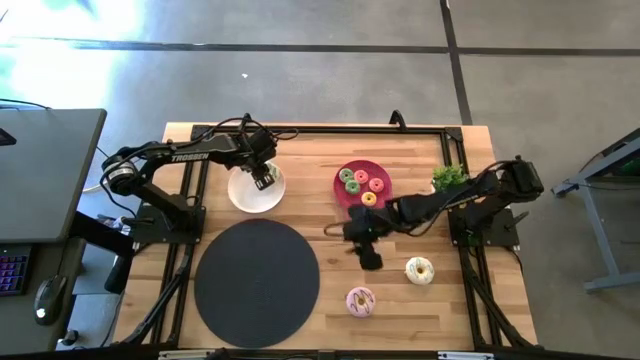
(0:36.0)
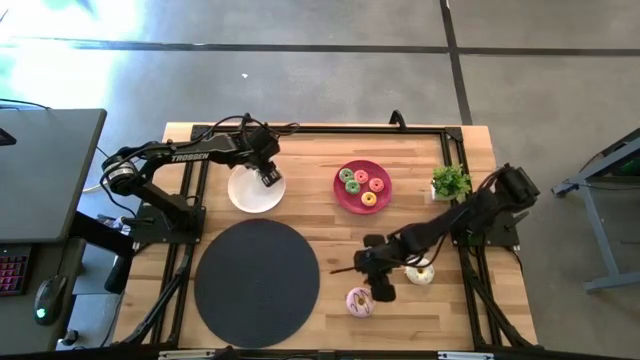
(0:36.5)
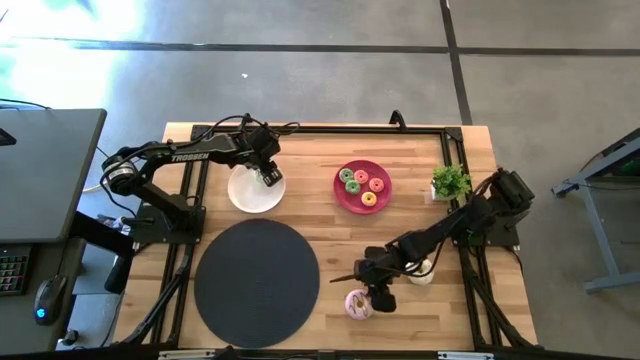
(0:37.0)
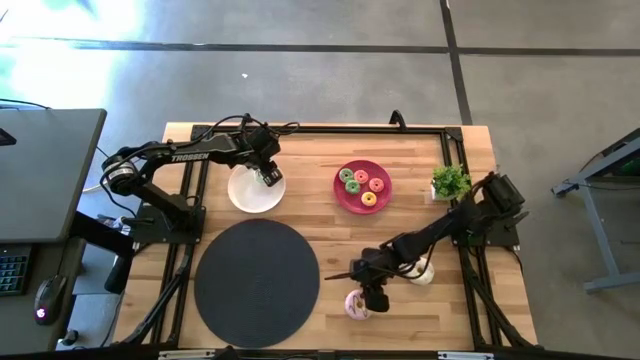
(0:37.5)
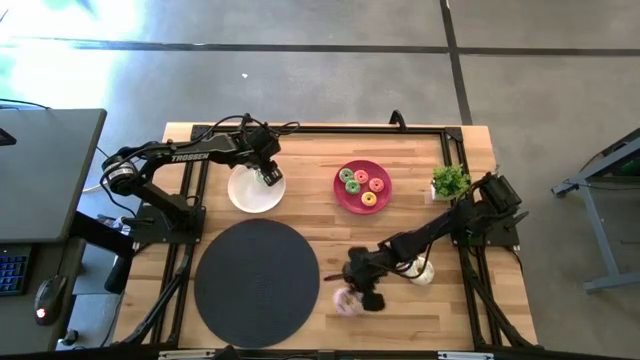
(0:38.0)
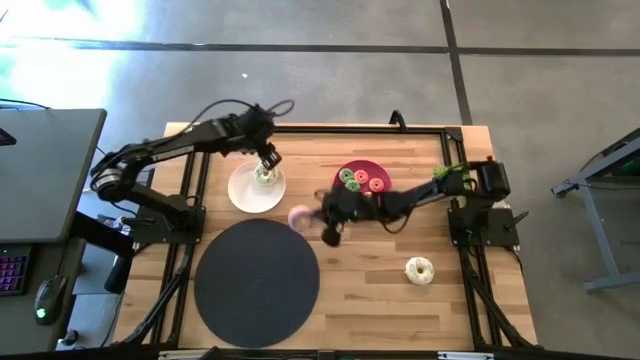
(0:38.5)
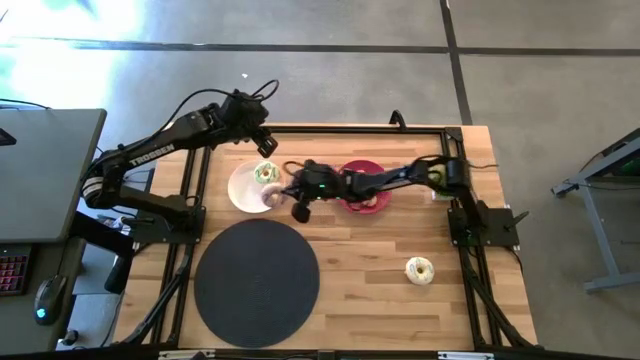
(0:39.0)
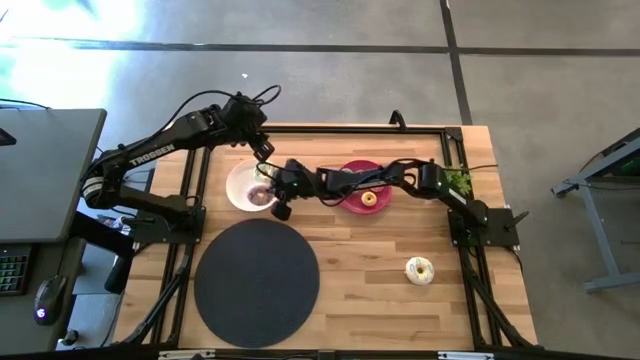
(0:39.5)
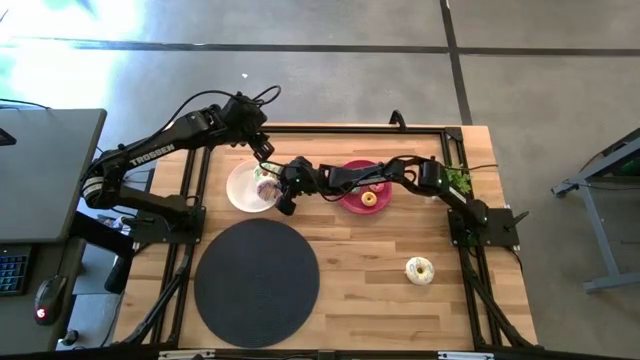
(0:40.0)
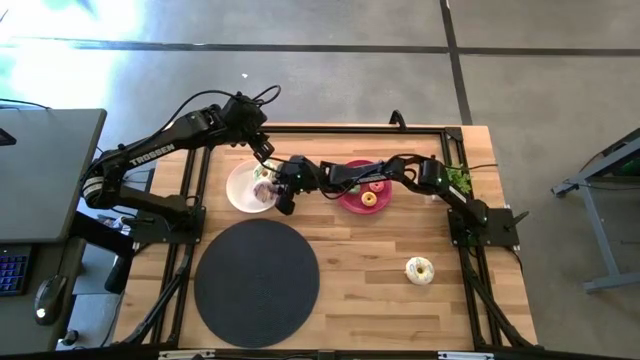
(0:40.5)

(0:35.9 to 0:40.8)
Task: Pick & Place donuts
Put the large purple donut on the white plate

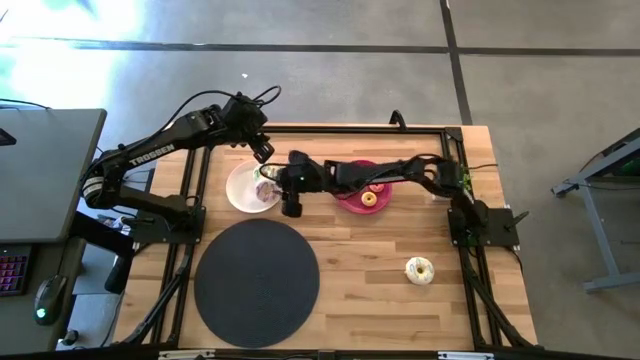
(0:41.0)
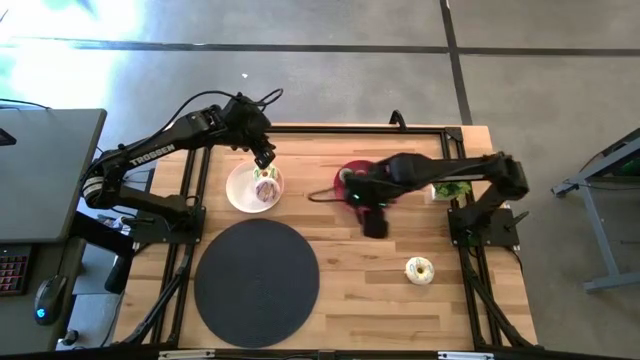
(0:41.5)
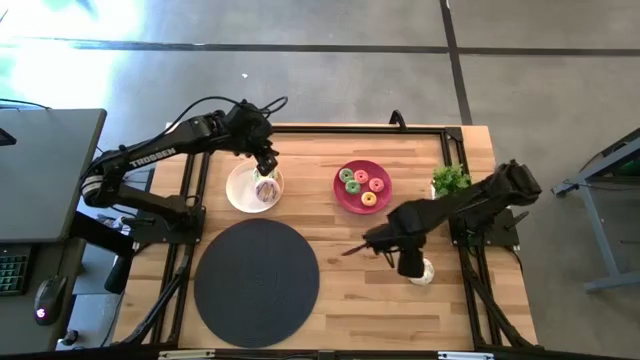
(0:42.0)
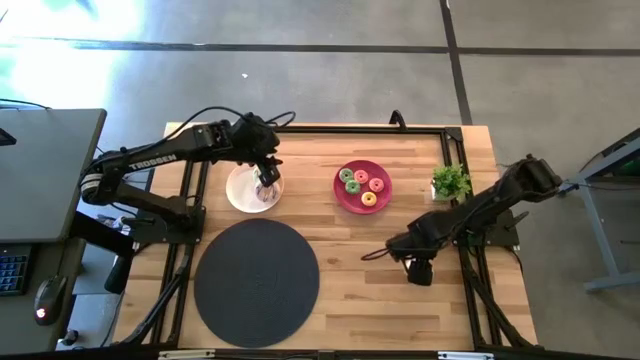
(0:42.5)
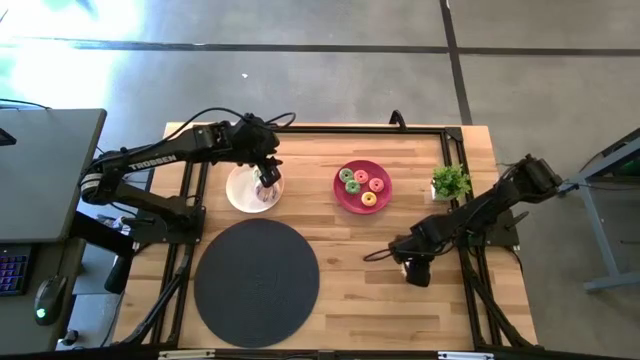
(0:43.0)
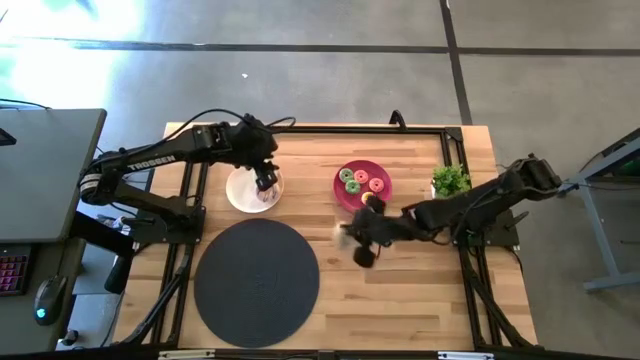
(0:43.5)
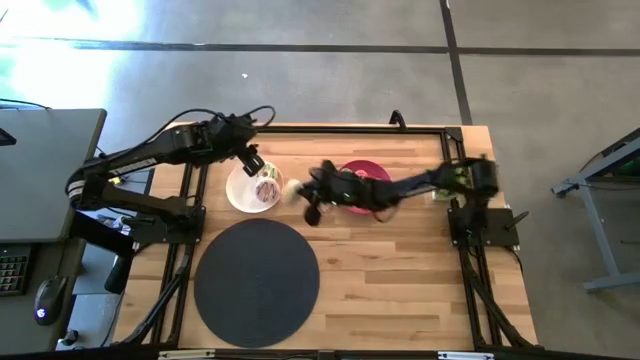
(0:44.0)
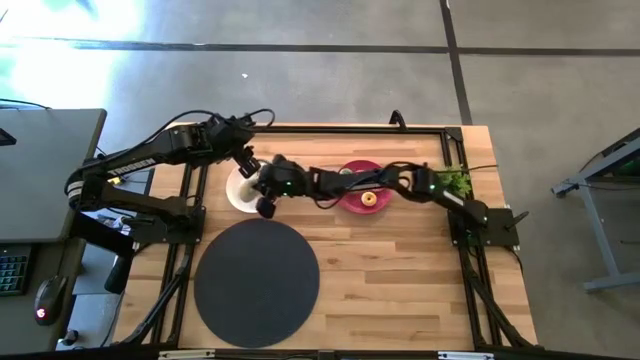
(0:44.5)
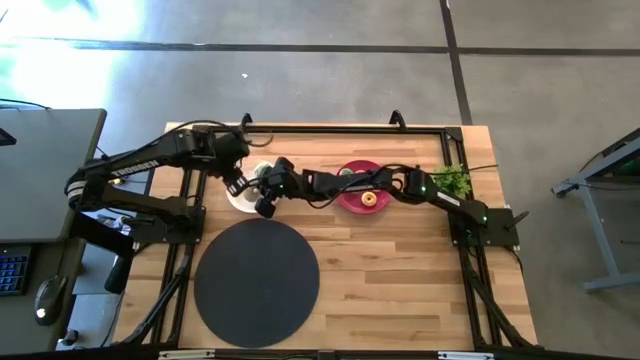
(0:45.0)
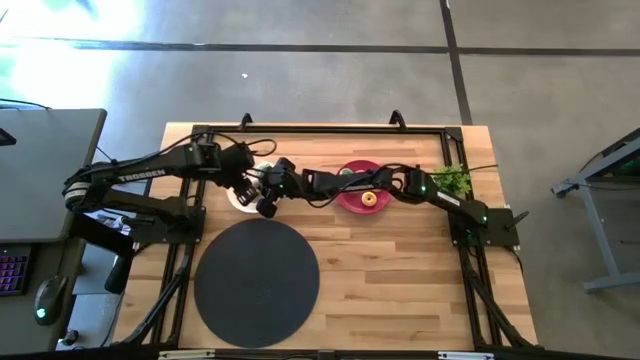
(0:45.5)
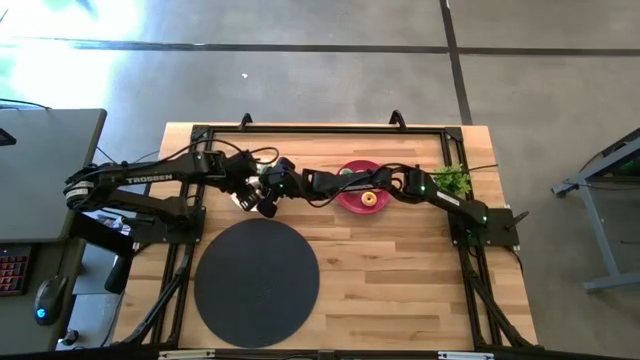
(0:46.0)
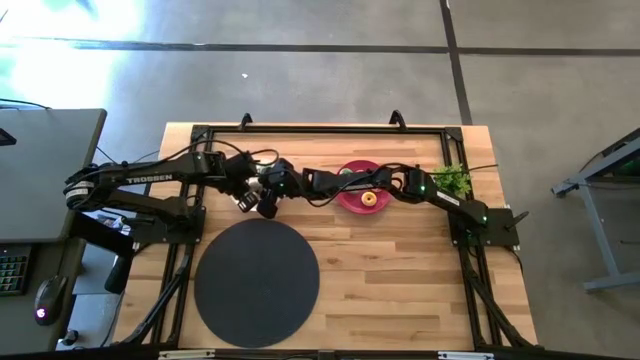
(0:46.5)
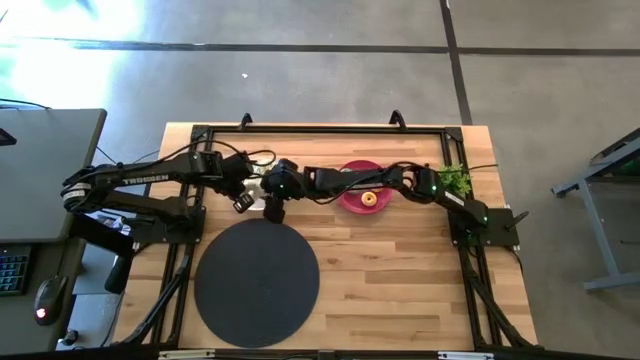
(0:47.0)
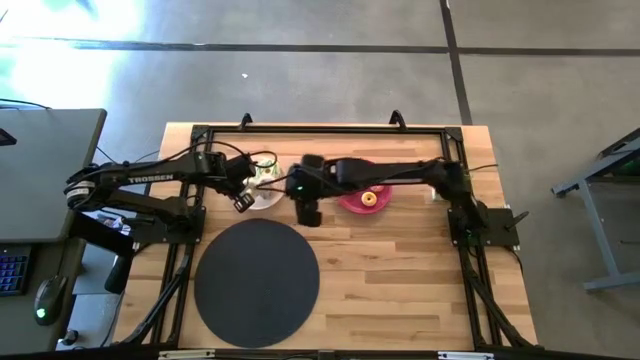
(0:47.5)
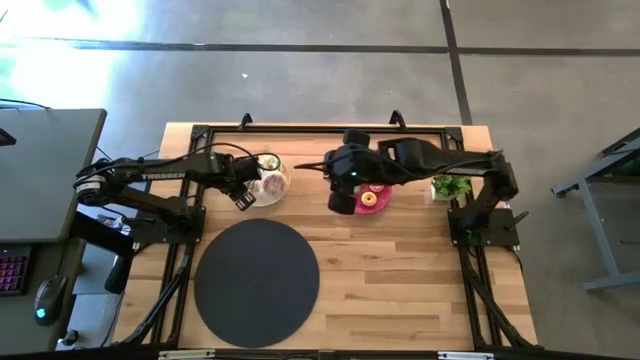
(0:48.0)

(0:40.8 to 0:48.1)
Put the large white donut on the white plate

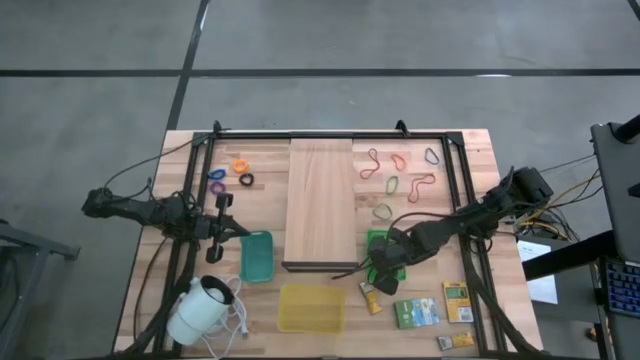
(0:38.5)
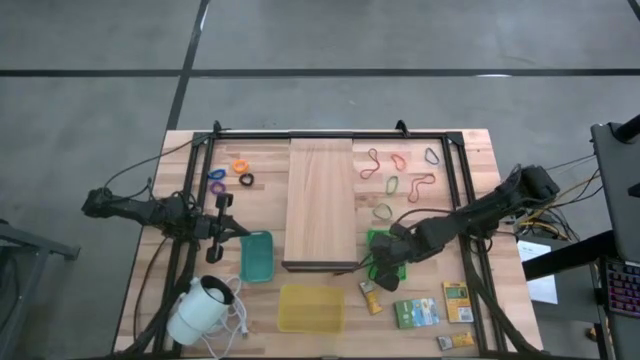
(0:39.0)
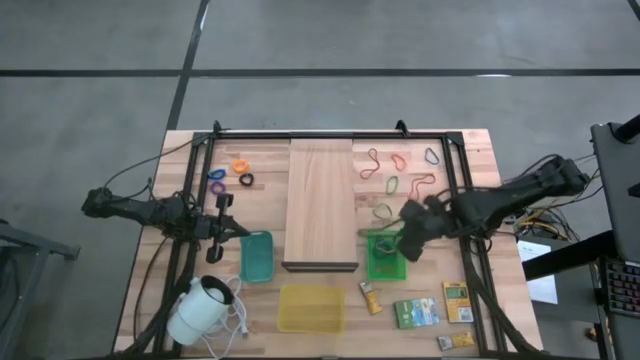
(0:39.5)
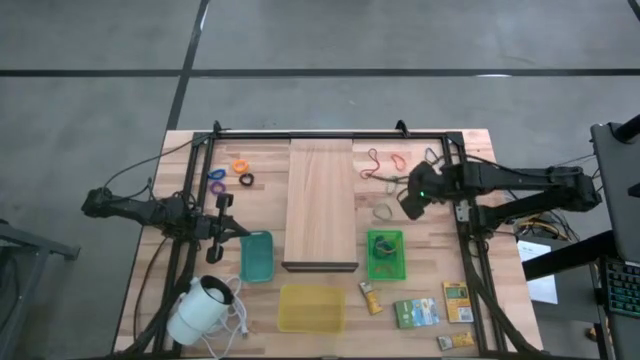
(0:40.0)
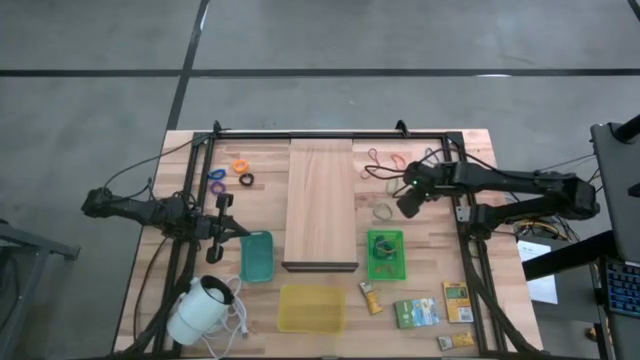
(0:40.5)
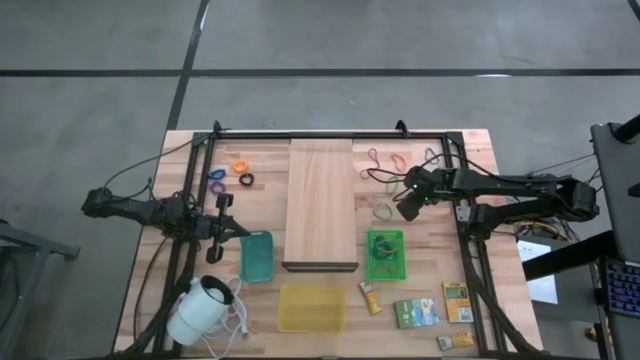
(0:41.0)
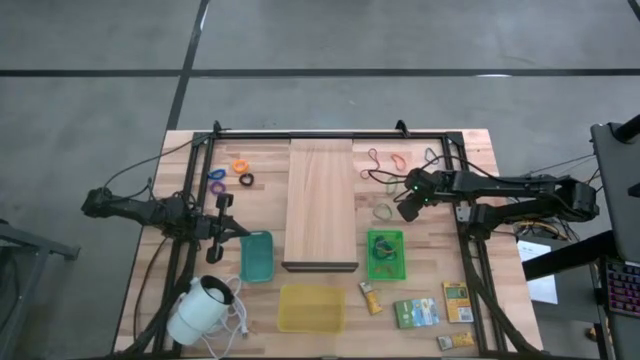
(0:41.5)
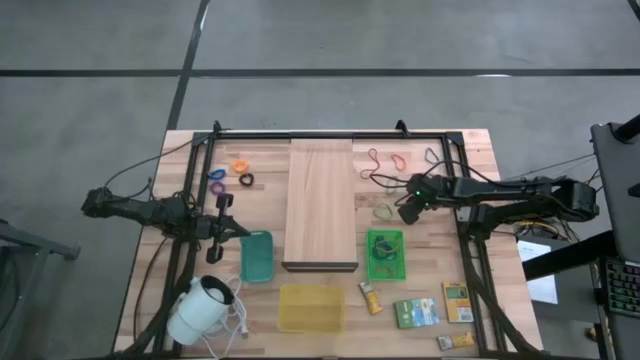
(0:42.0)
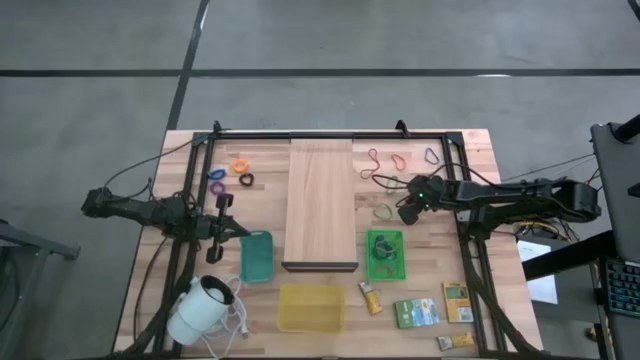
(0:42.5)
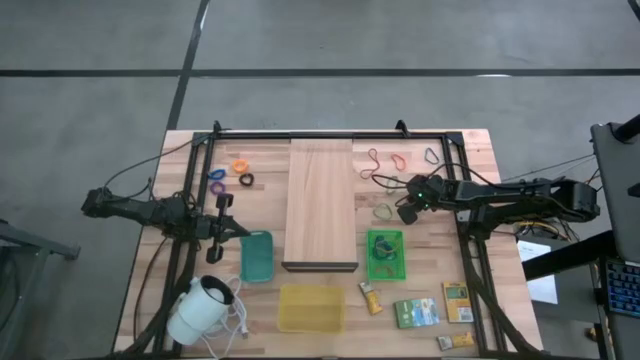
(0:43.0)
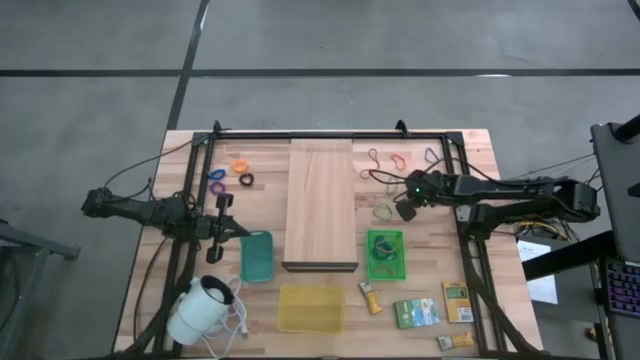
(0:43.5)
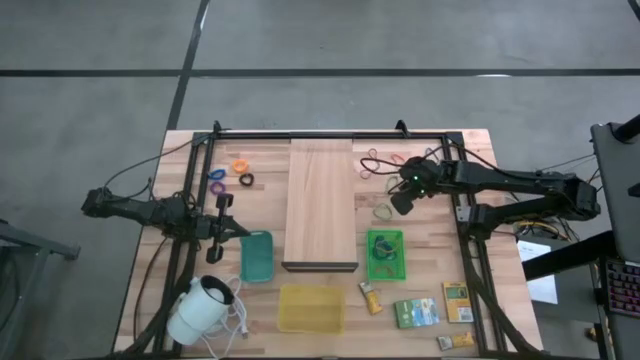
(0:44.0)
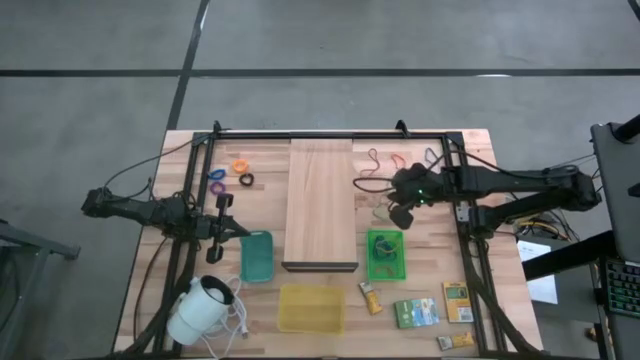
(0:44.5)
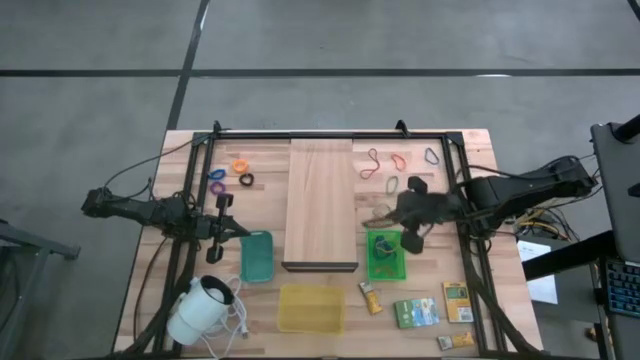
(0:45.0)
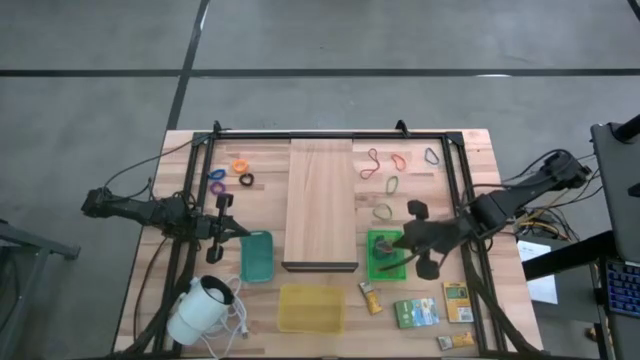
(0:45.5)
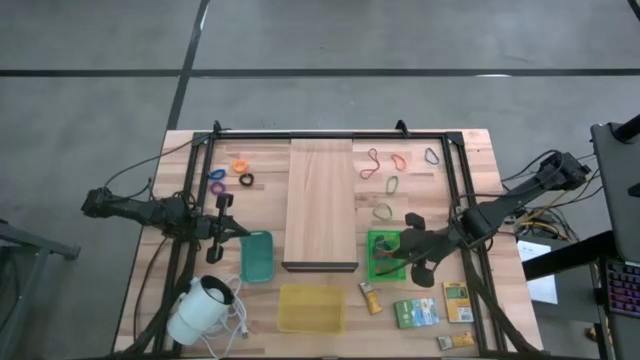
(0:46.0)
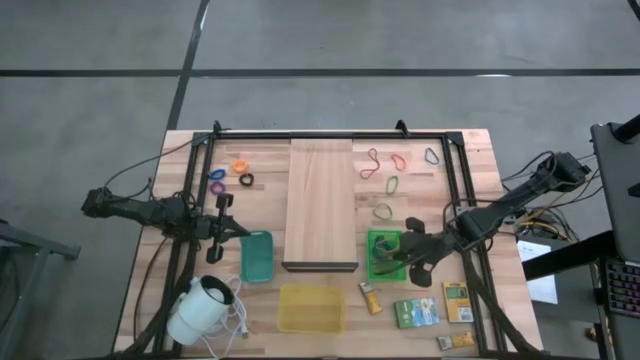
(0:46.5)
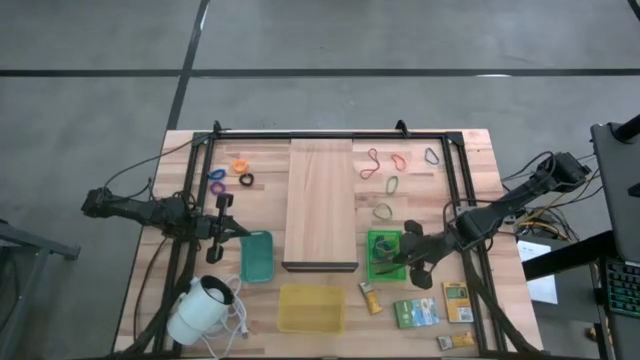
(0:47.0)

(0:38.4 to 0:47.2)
Task: Pick & Place Office Desk Supplies
Put the bottom red rubber band into the green bin
